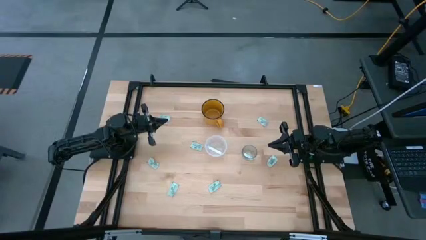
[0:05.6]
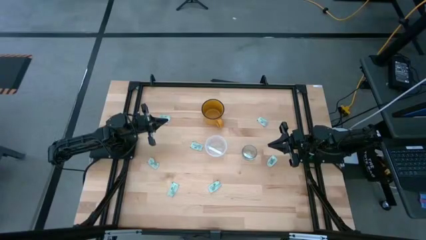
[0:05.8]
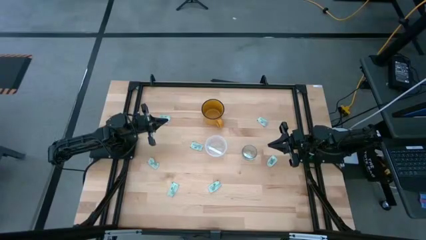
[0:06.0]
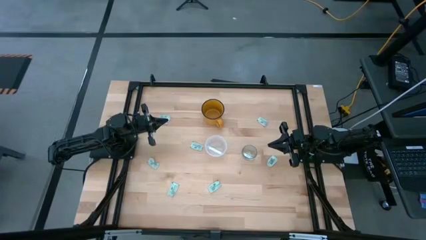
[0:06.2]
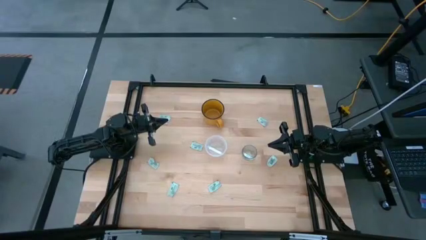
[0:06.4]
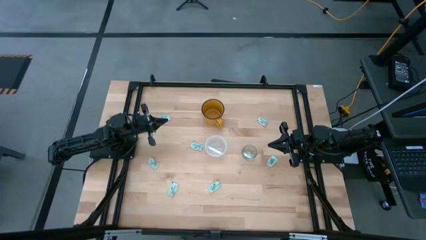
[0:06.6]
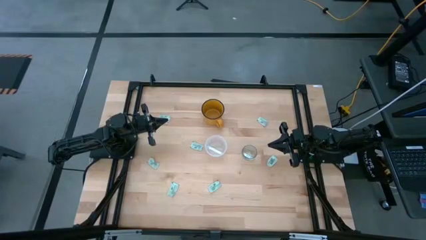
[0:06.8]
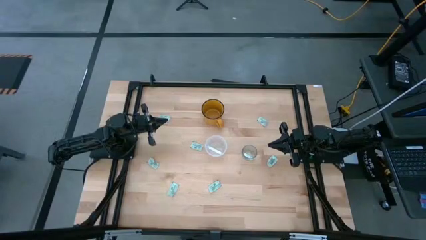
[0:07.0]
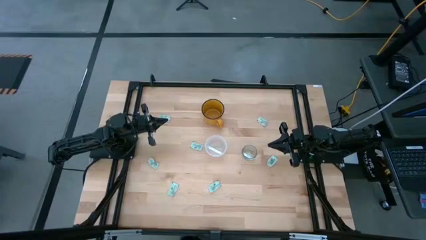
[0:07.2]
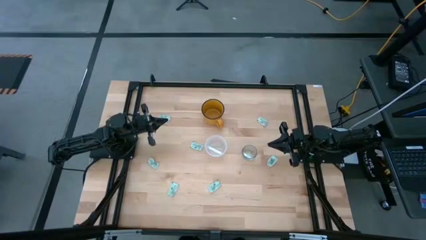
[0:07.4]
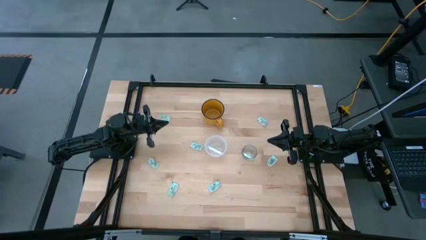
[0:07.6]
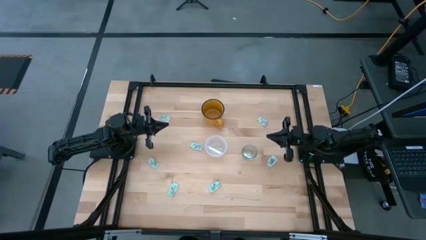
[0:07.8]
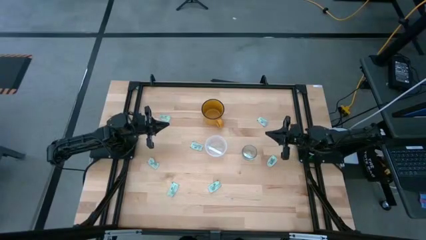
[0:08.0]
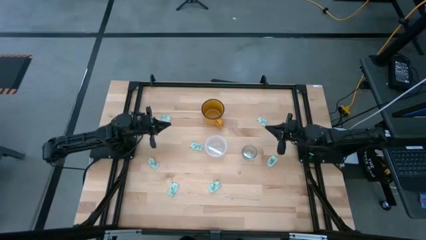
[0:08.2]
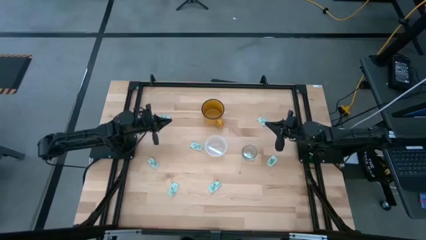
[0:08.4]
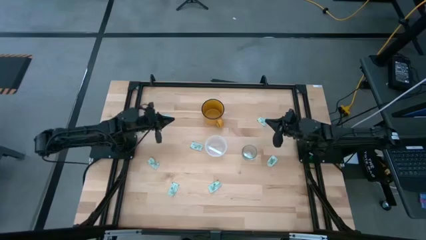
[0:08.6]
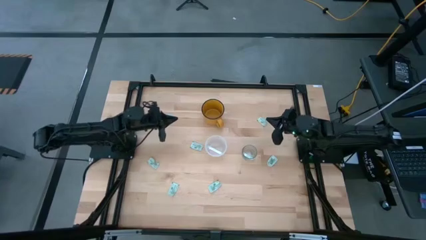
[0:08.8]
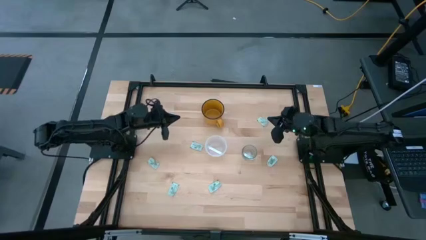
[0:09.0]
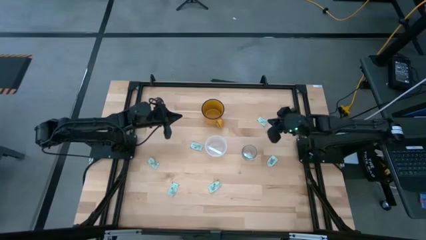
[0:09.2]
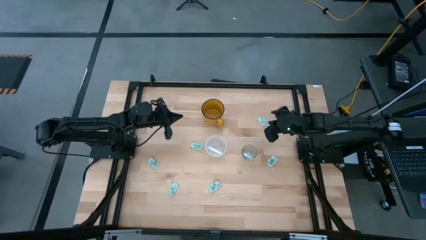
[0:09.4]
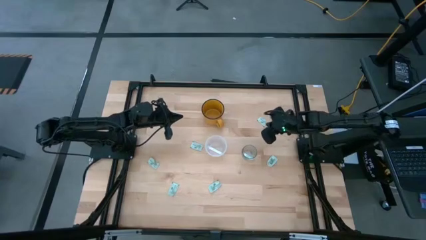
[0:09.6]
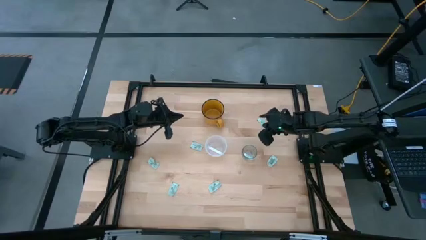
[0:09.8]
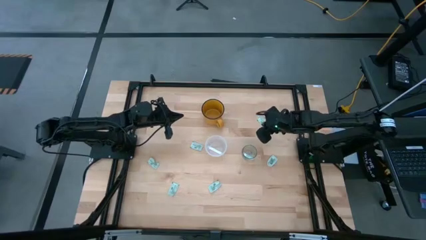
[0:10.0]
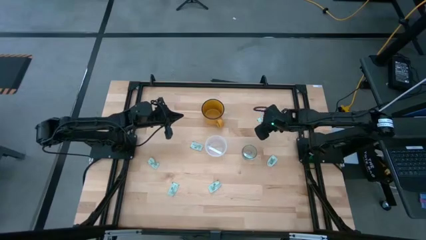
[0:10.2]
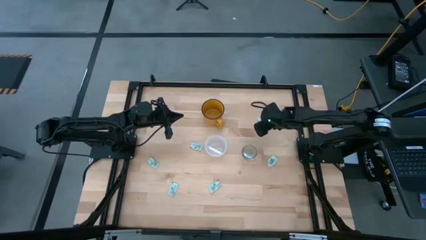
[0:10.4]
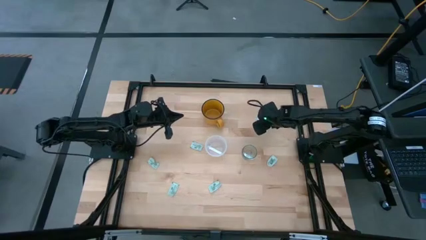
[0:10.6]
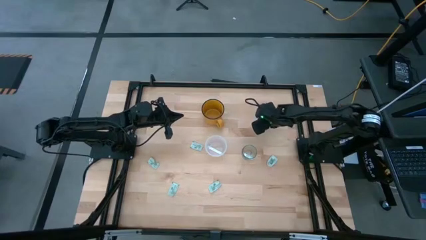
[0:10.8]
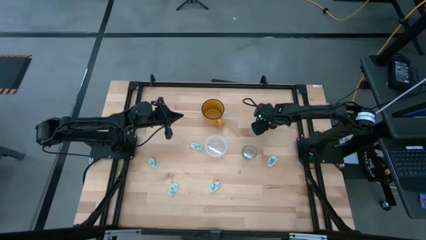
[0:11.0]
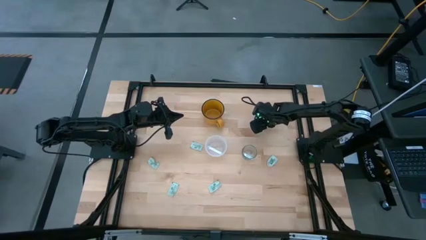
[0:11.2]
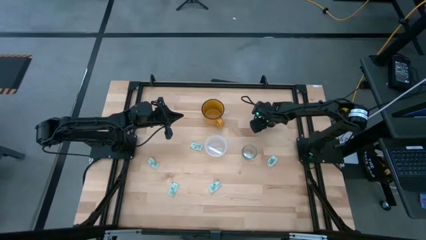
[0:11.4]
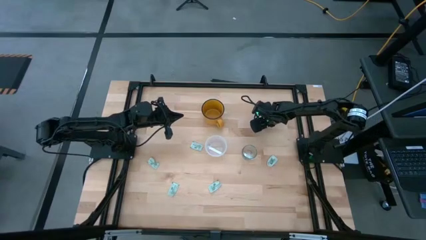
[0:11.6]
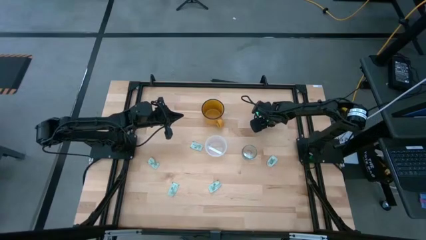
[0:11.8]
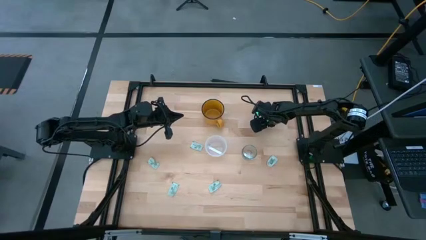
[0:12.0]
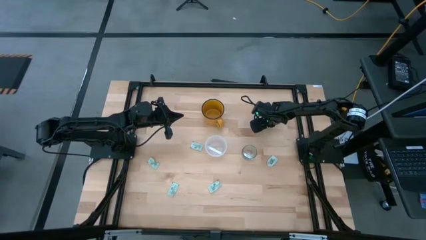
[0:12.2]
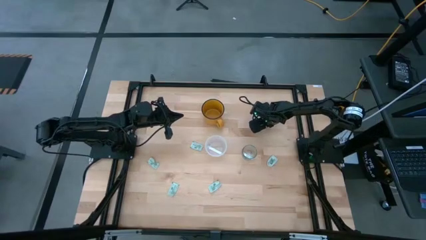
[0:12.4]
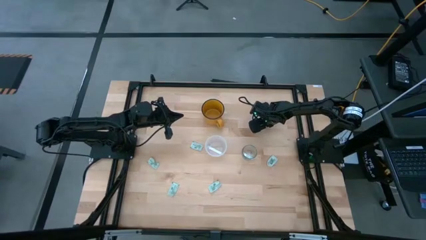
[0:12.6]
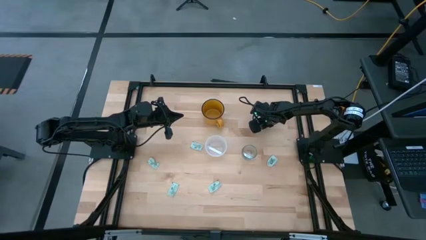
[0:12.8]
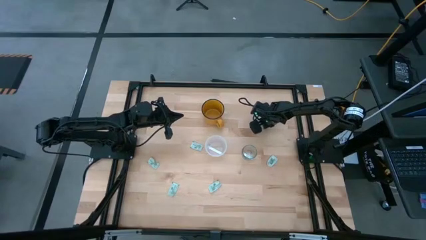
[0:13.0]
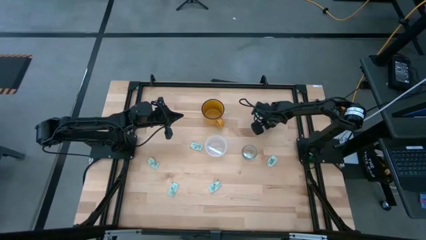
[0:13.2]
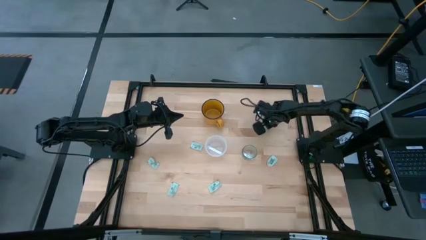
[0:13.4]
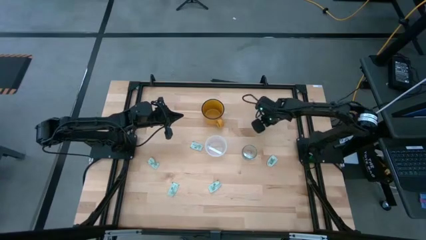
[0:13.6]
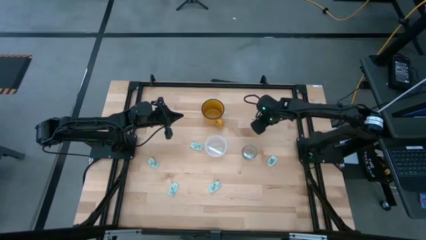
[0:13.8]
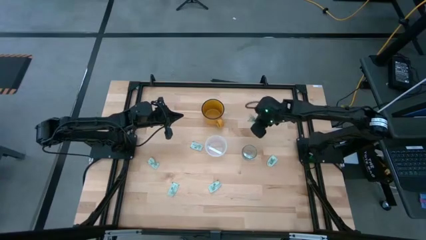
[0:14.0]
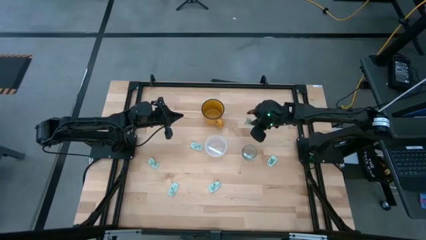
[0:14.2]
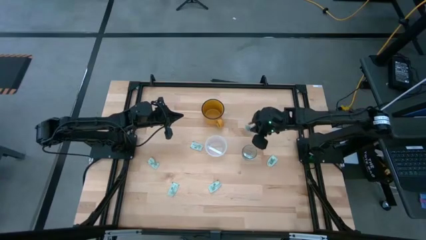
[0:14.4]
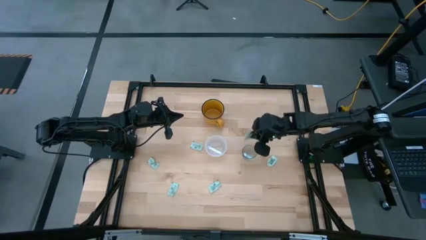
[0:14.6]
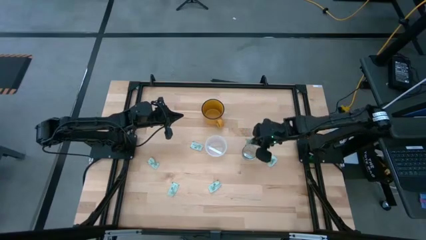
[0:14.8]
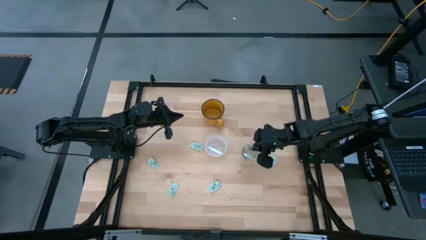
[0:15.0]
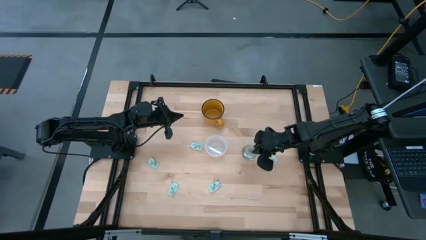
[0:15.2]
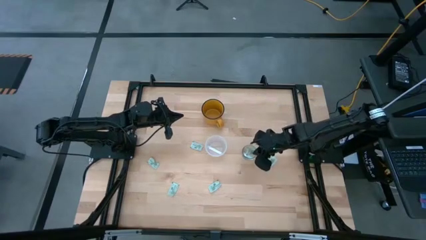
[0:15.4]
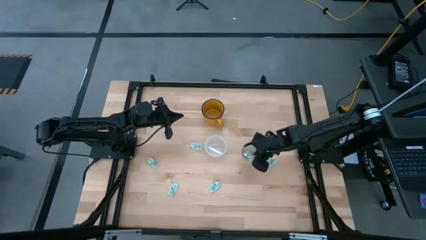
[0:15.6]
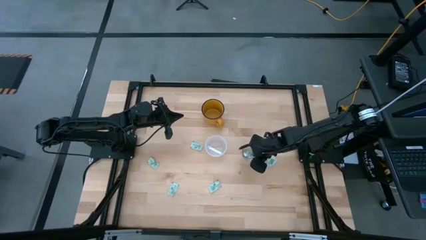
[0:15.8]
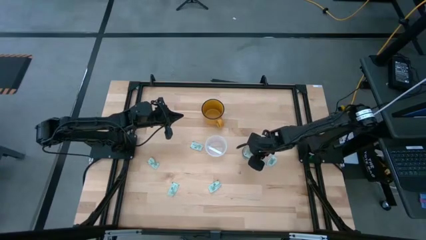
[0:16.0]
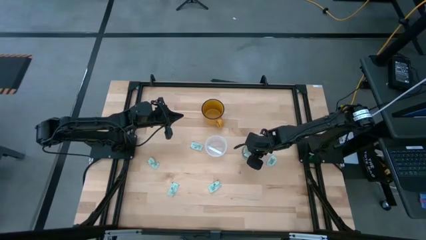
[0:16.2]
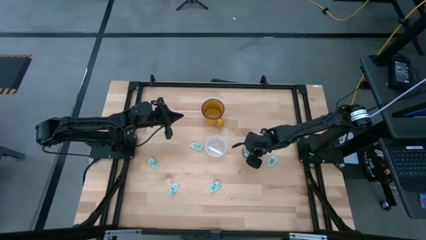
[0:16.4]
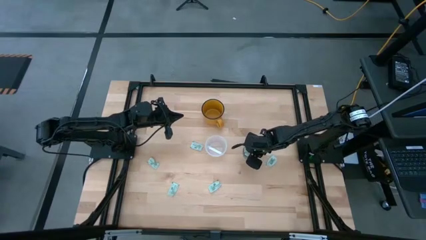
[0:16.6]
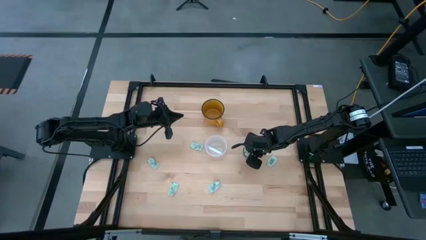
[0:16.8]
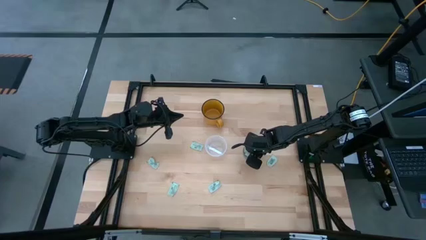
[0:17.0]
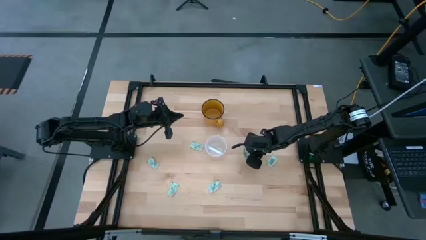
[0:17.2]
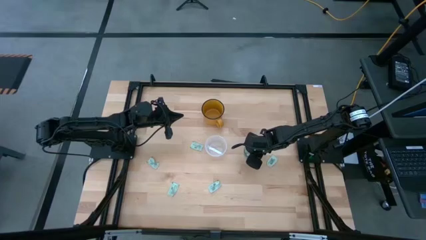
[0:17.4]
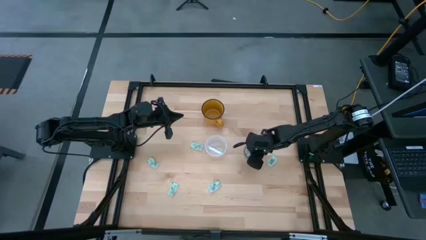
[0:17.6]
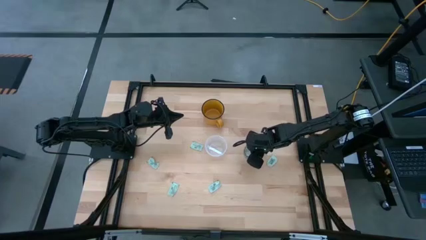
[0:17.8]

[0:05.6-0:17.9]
Task: Pick and place Stevia / Truvia into bins
Put the green stevia packet into the glass container
